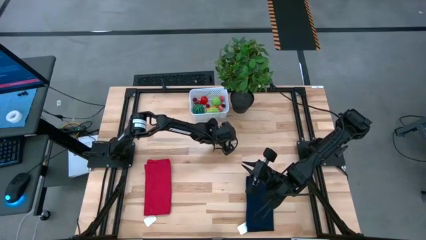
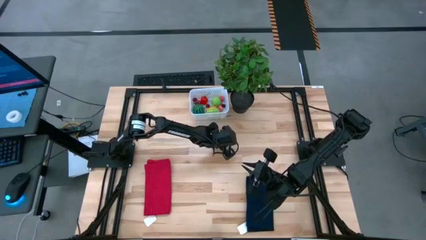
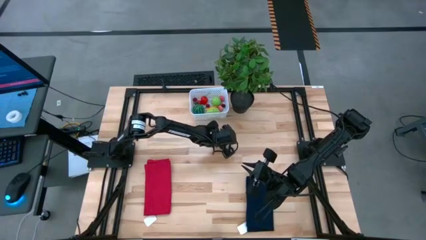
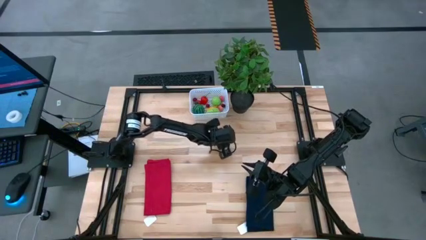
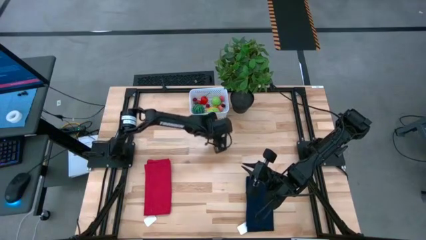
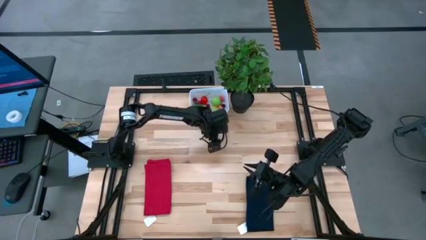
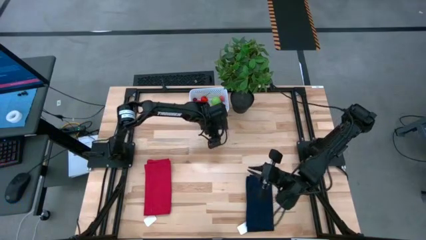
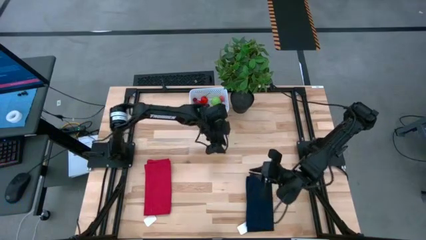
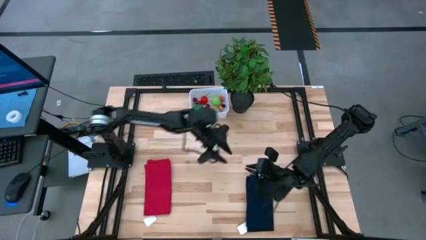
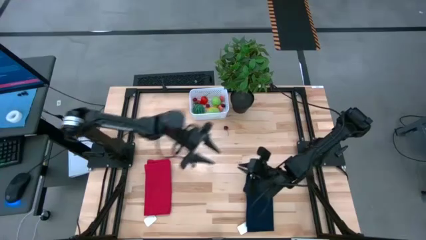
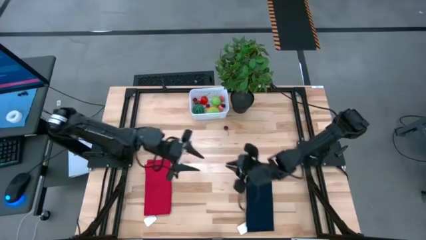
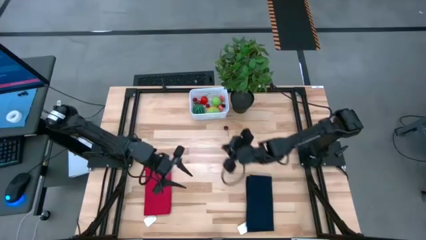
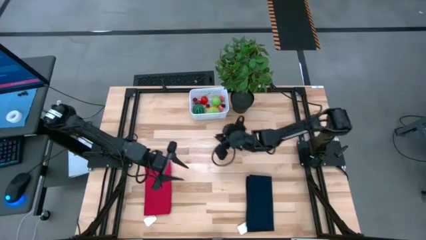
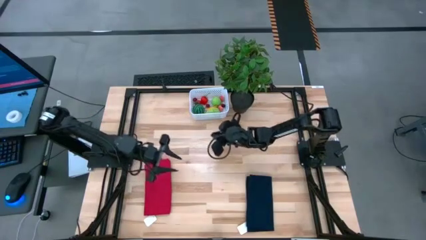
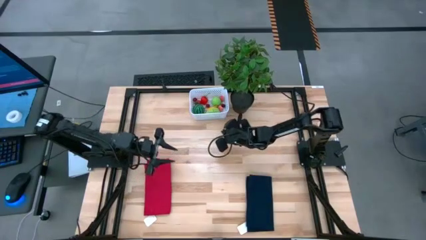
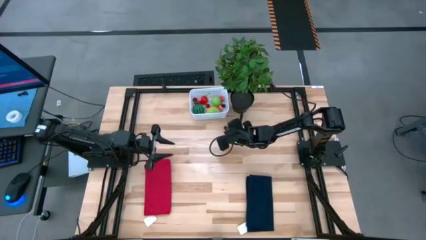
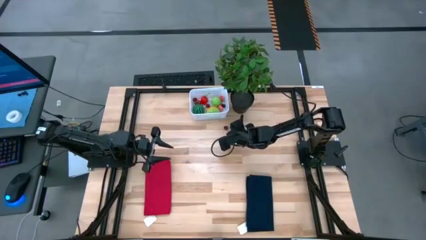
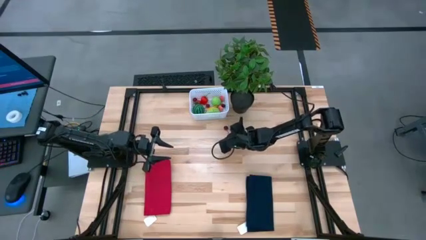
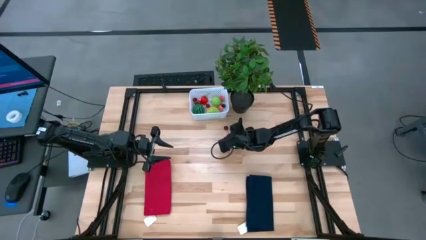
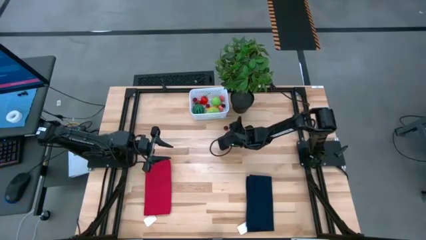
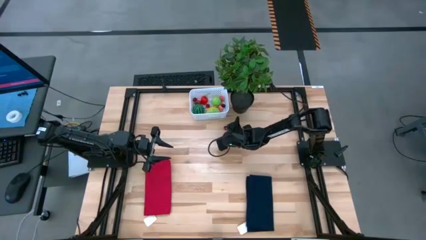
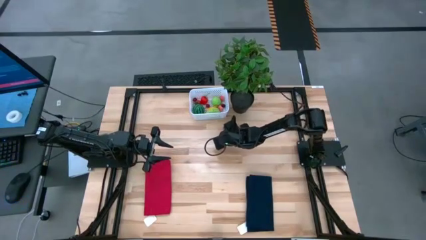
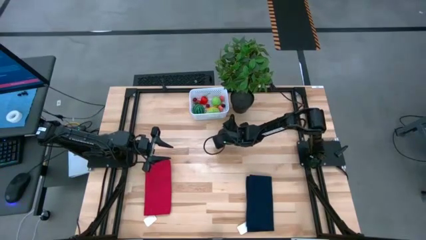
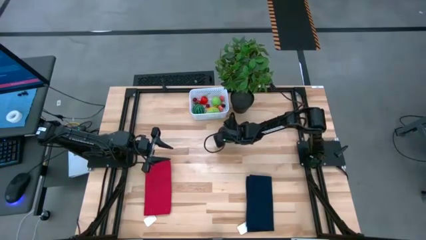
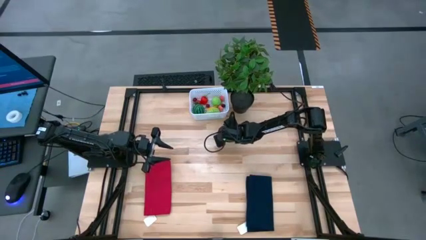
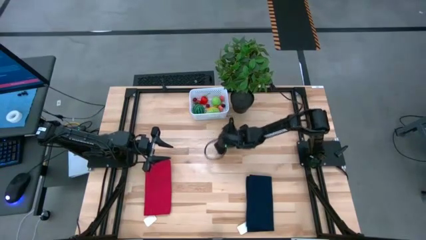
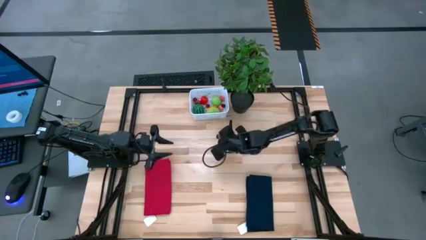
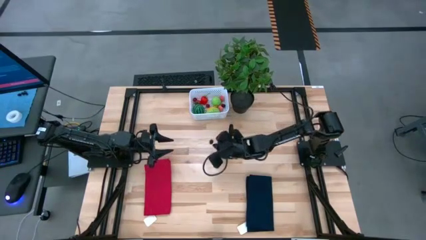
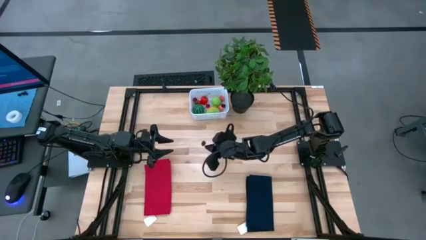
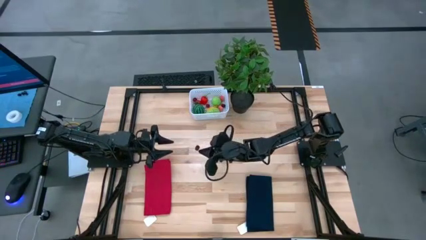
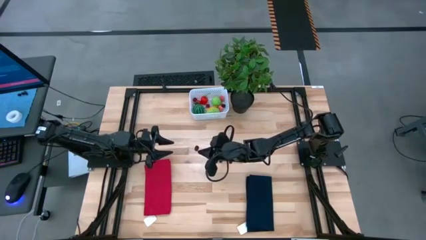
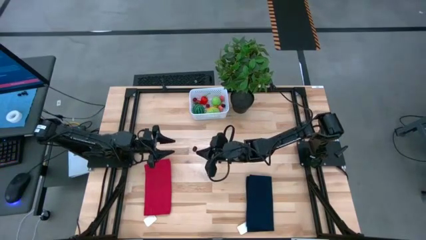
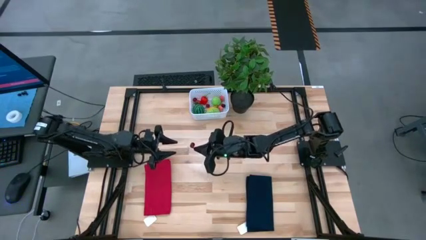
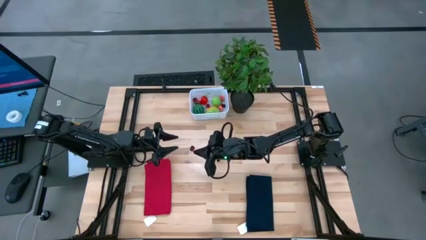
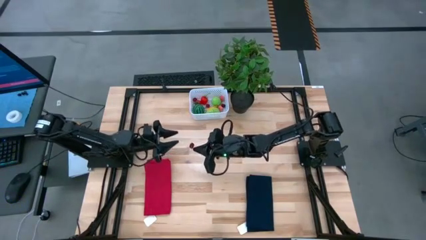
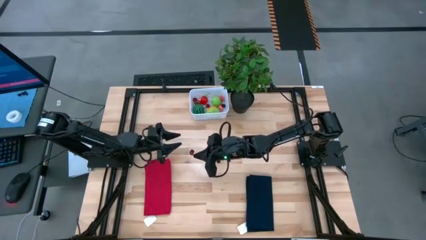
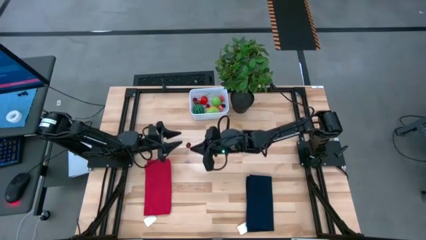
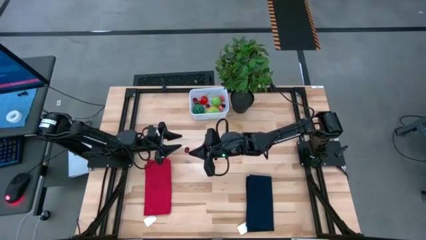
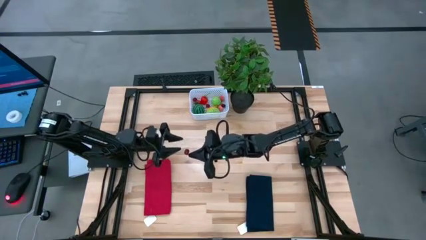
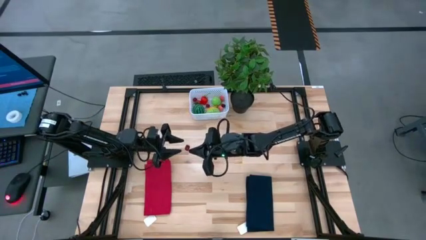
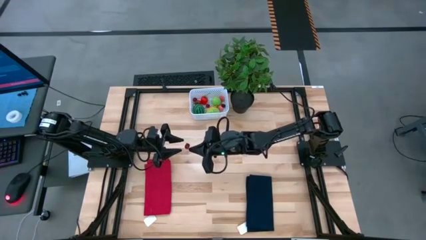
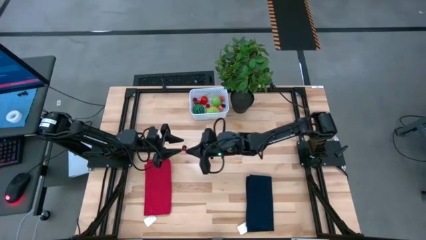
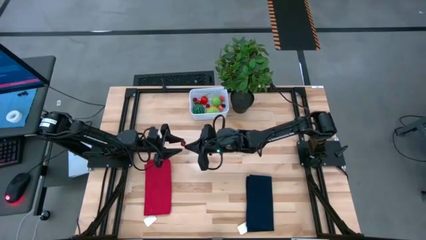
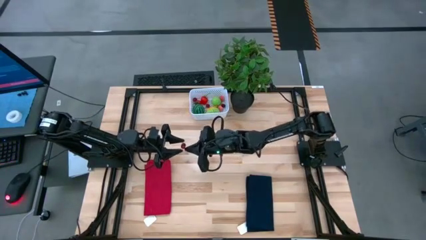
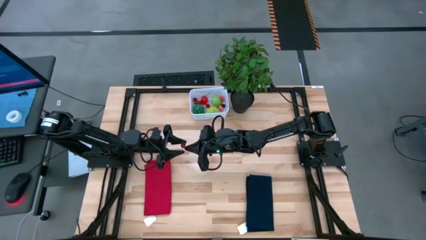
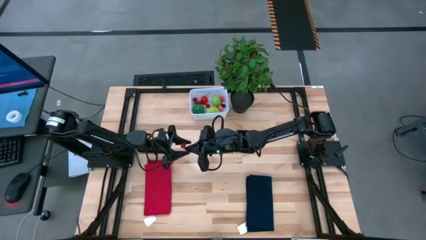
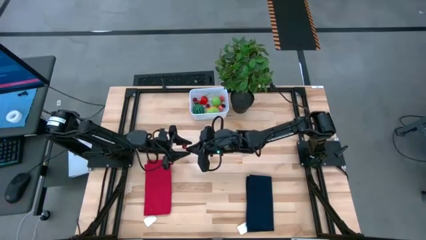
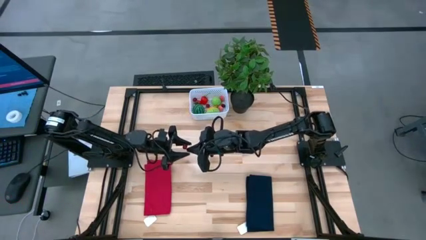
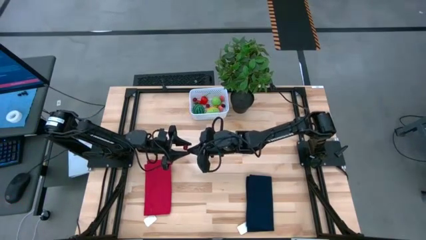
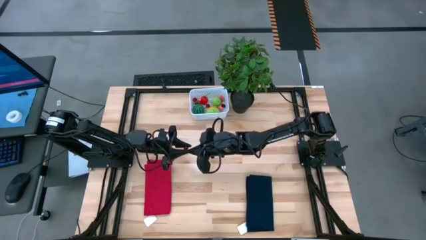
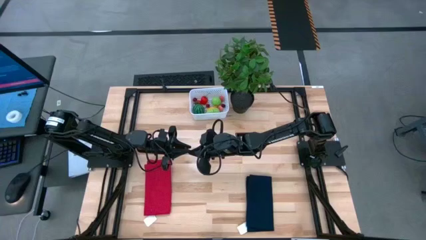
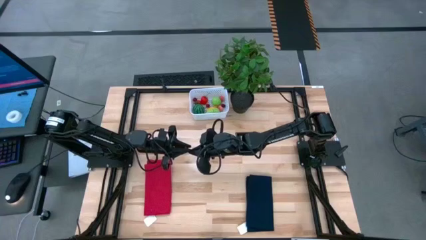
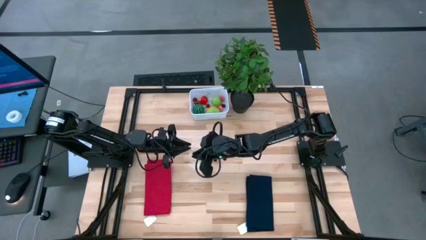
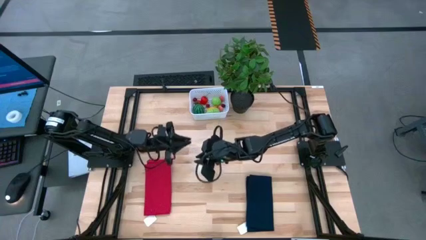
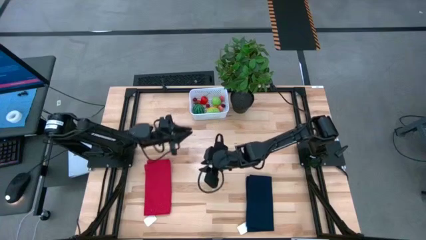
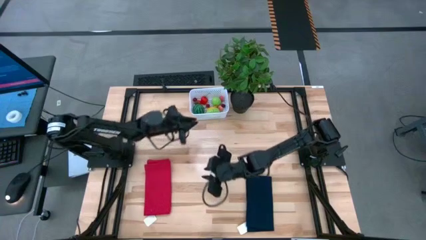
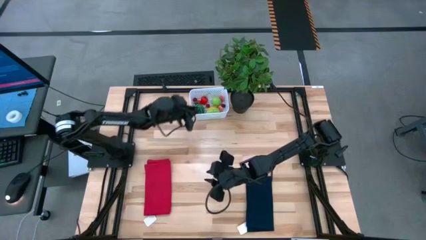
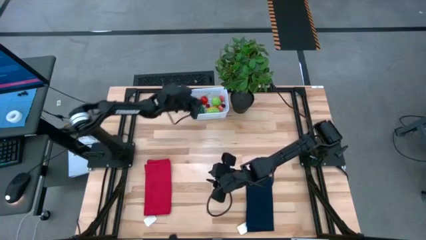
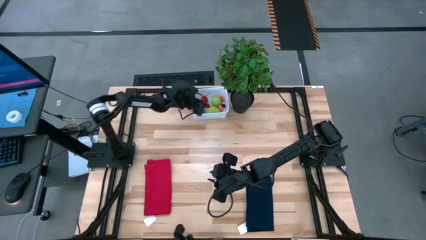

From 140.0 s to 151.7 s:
Task: Pick and placing Produce into tupperware
Put the red cherry into the white basket

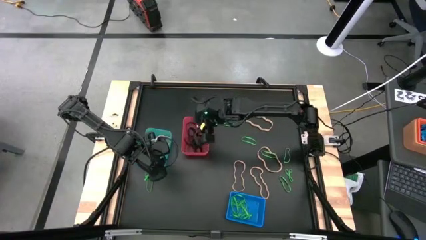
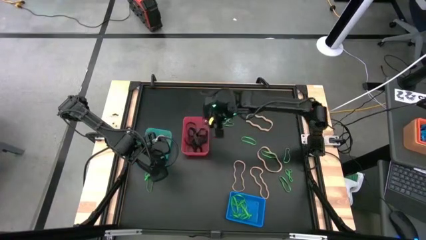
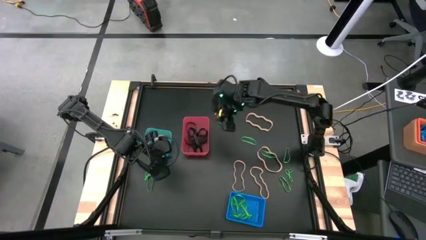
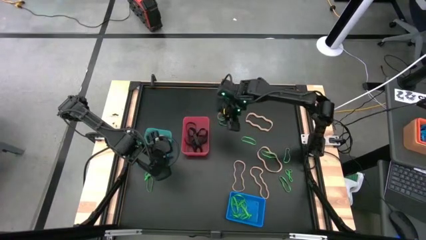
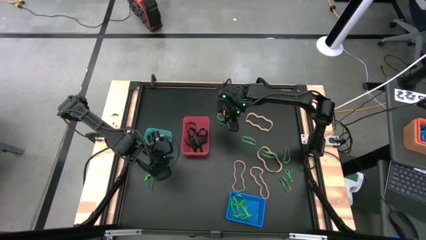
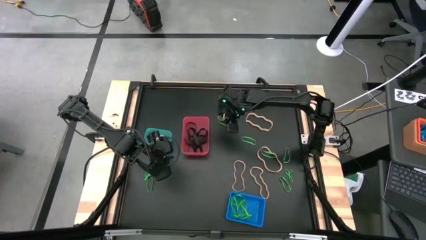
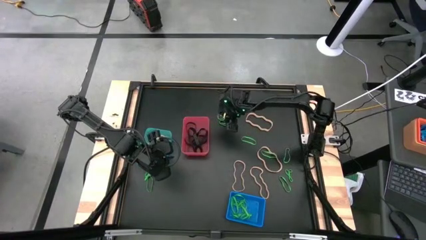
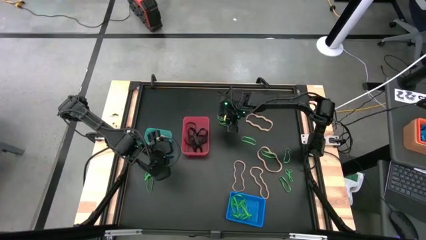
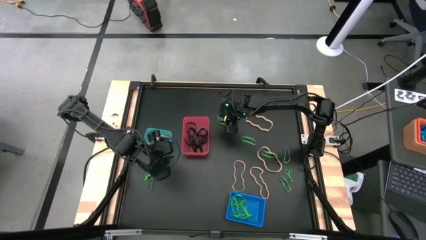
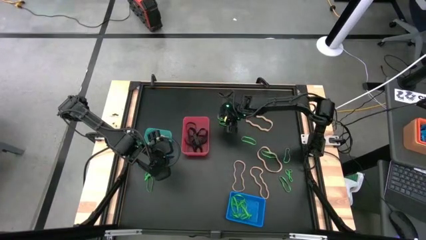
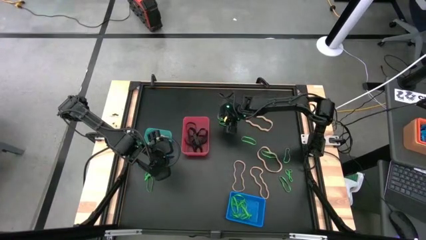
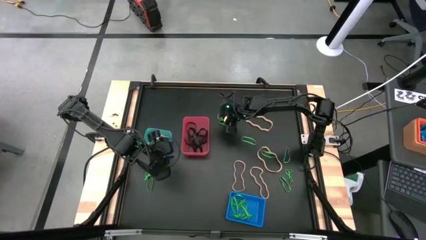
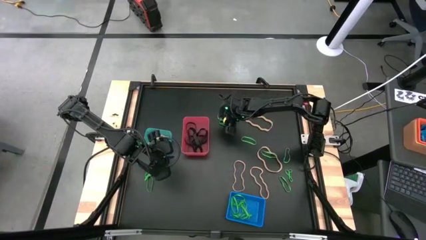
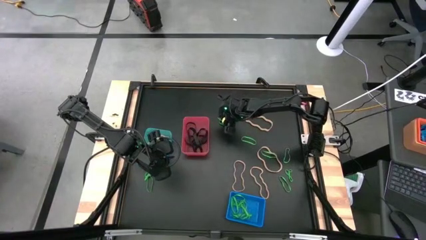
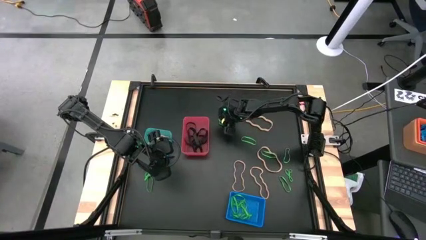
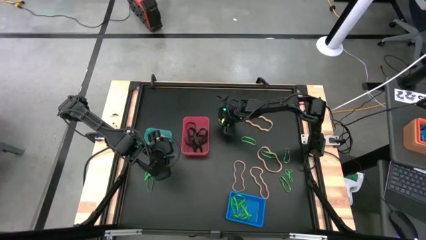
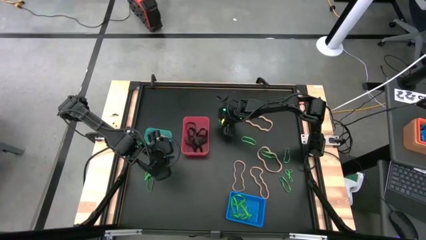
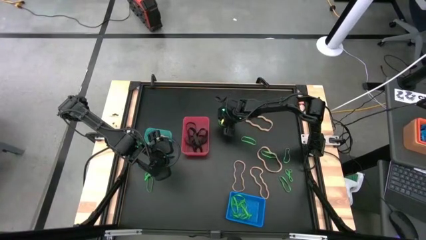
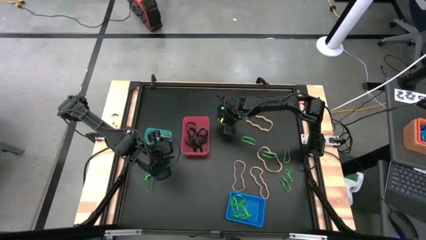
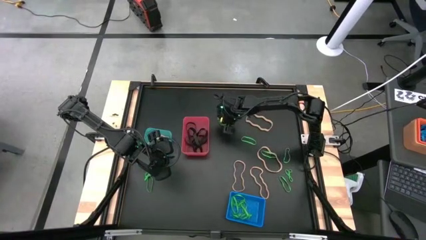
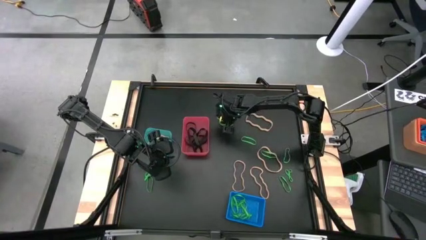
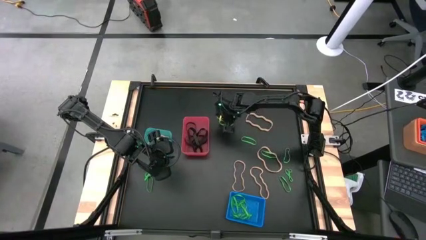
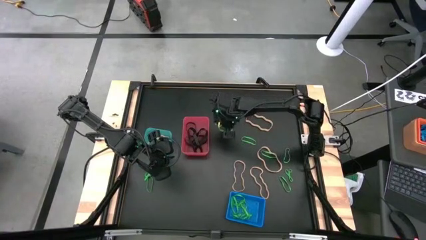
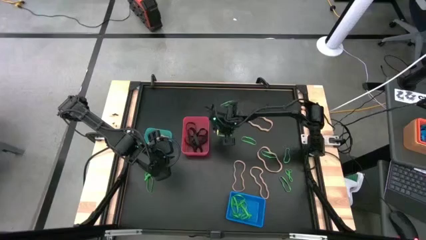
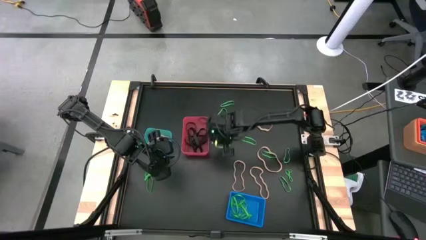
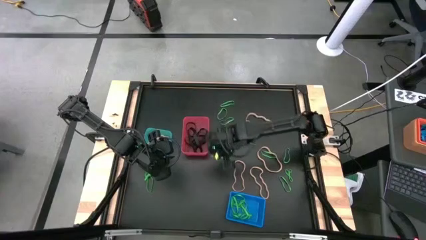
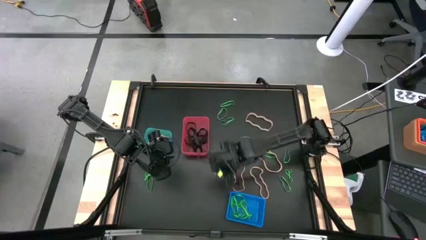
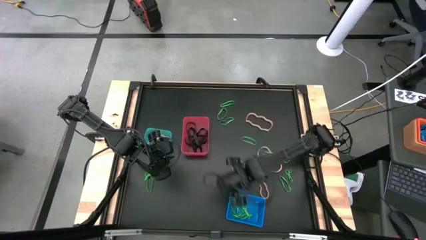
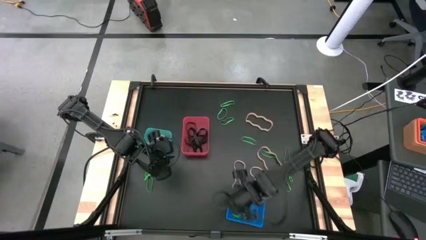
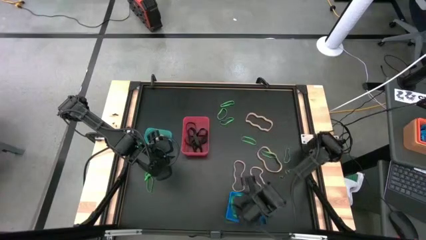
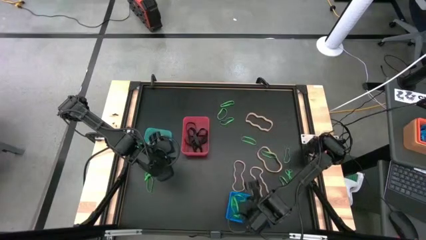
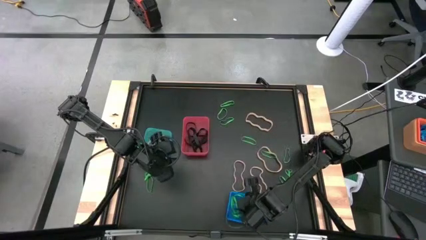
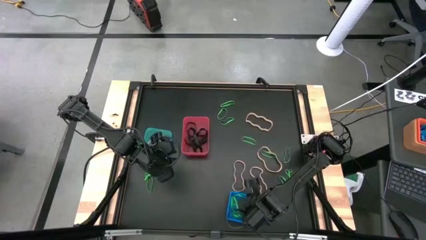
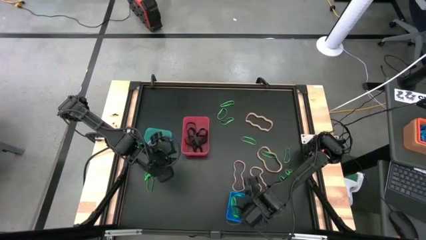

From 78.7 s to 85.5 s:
Task: Sort rubber bands into baskets
Put the green rubber band into the blue bin
